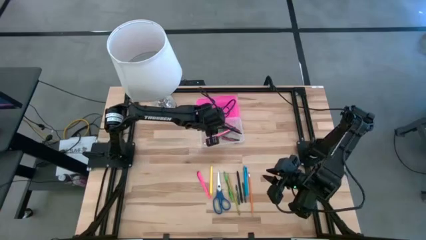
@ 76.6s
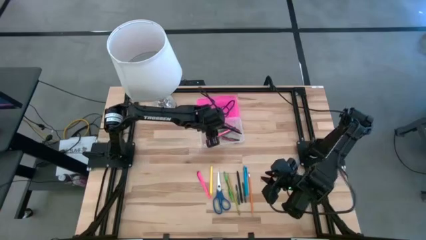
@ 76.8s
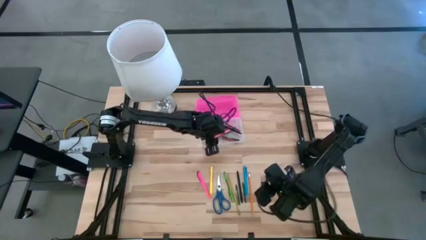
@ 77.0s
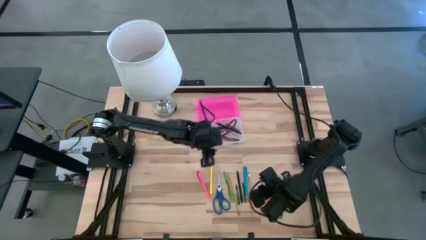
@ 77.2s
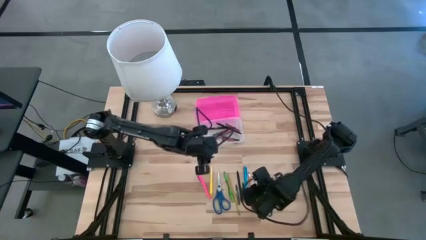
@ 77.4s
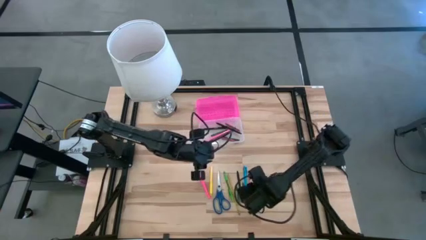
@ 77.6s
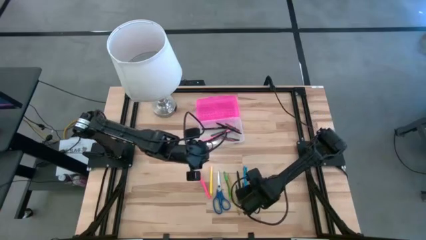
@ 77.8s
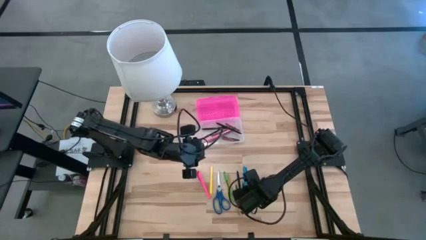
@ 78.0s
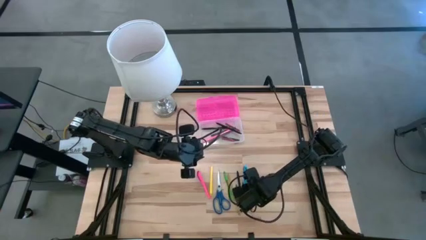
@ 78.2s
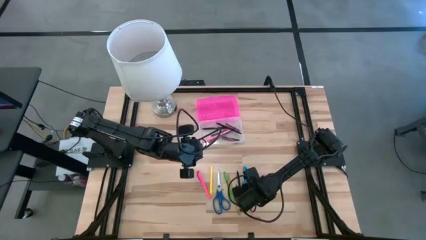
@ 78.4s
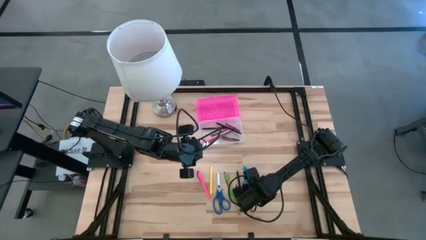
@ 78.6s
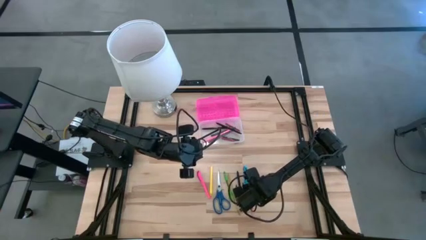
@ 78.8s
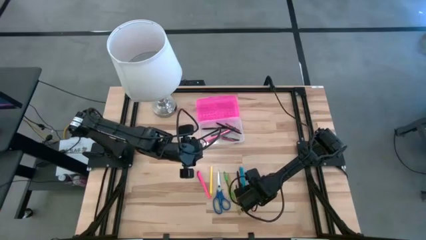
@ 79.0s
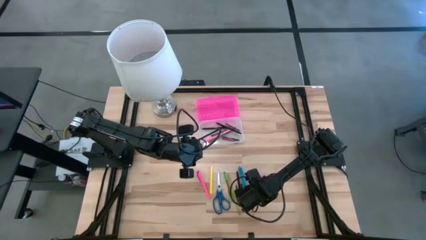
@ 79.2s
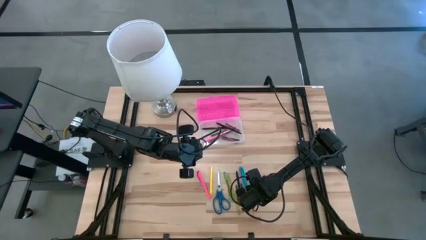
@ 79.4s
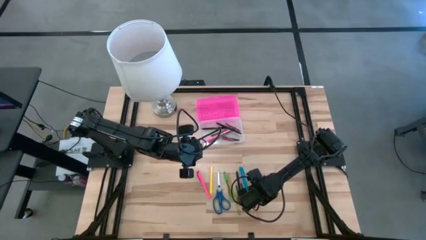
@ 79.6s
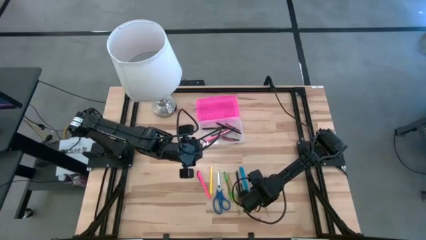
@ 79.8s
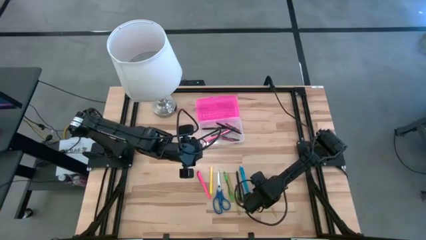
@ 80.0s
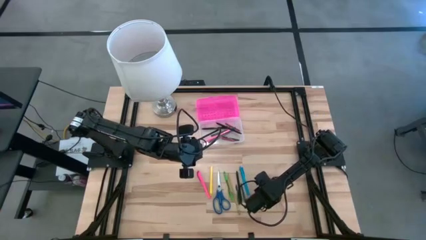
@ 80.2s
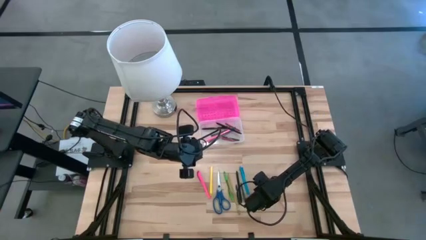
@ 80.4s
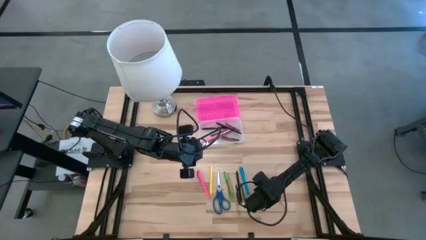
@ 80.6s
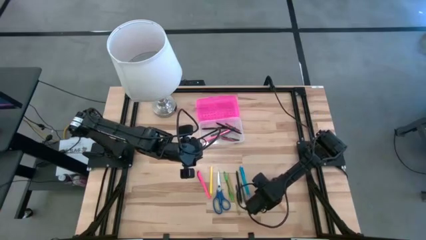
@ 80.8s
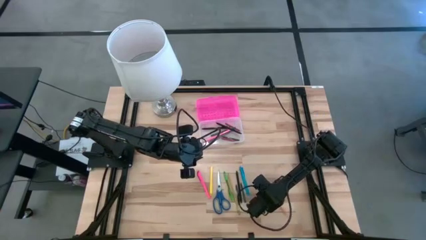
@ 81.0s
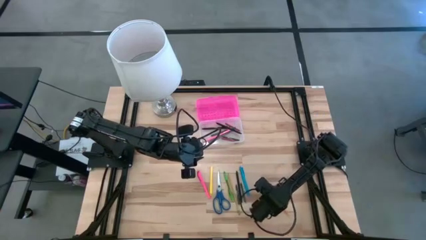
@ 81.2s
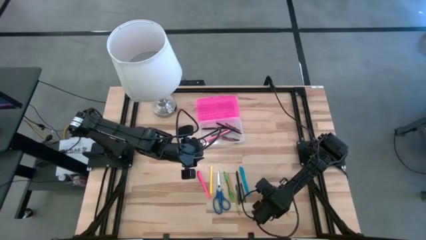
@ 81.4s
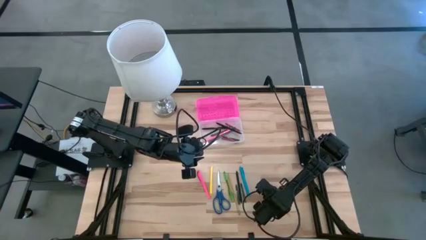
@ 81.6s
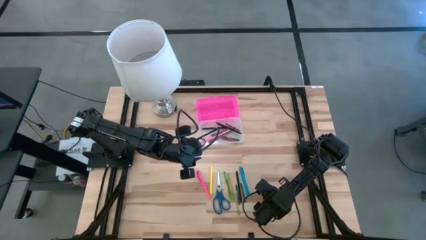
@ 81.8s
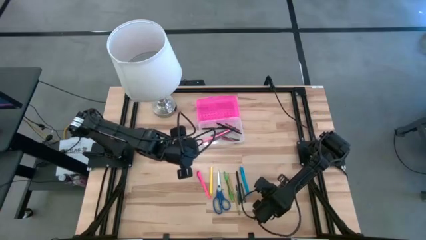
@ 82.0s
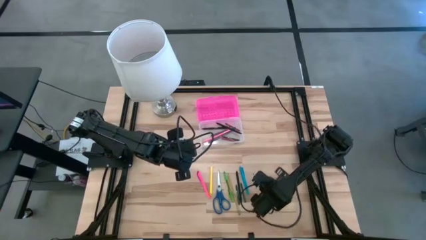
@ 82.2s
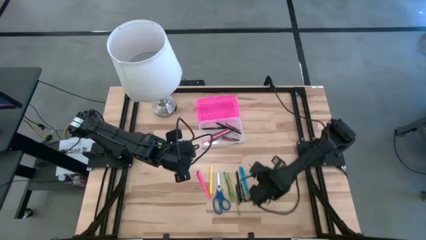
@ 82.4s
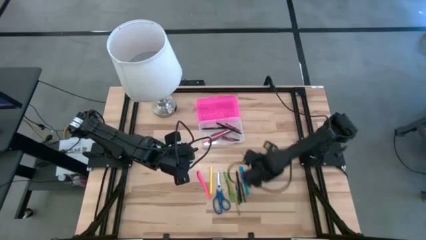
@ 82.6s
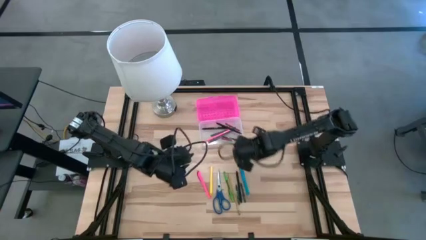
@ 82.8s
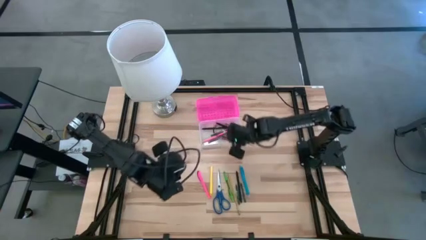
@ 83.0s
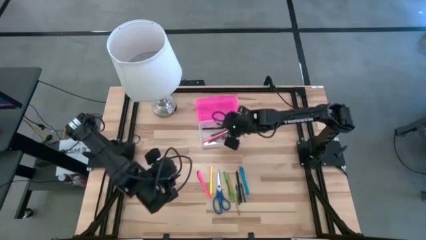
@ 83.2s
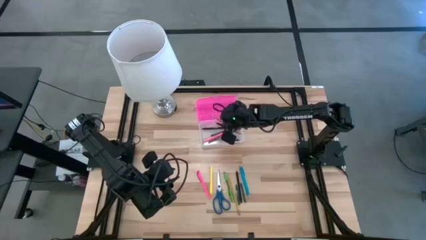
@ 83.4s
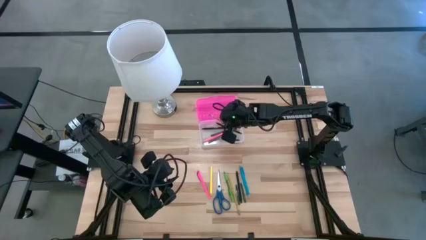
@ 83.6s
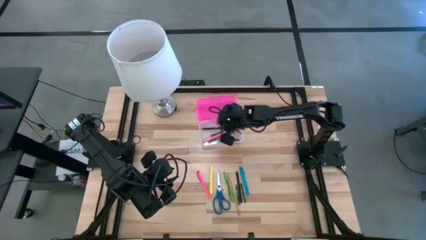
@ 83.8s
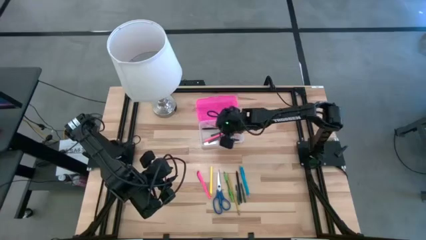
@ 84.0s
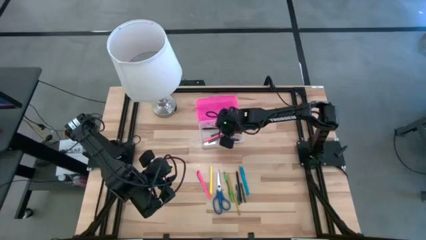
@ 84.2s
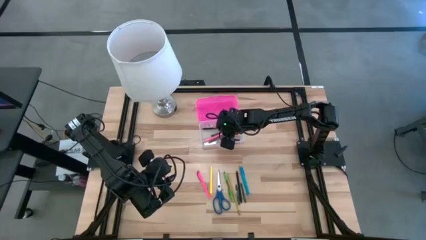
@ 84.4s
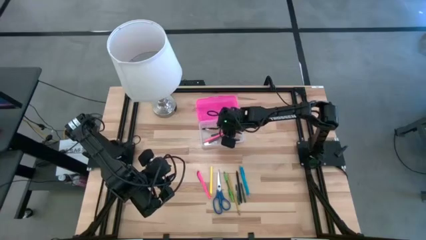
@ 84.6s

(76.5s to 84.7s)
Task: Pick & place school supplies into a supply box
Put the orange pencil into the pink supply box

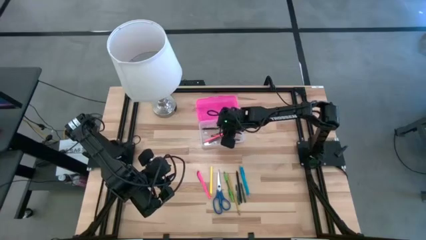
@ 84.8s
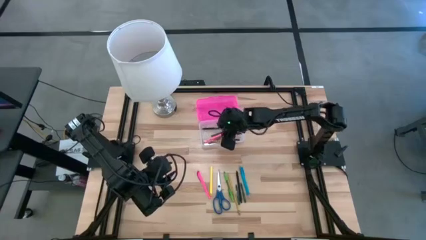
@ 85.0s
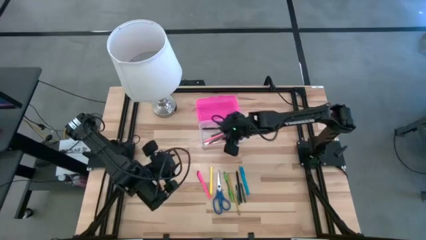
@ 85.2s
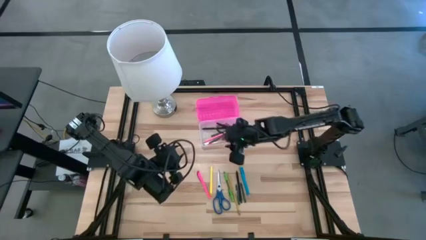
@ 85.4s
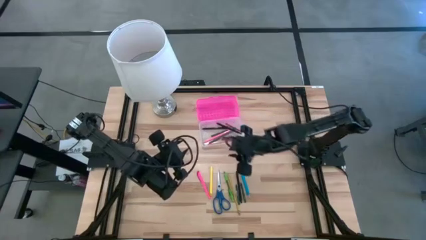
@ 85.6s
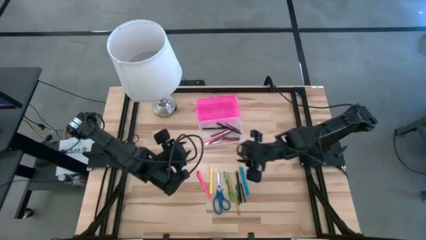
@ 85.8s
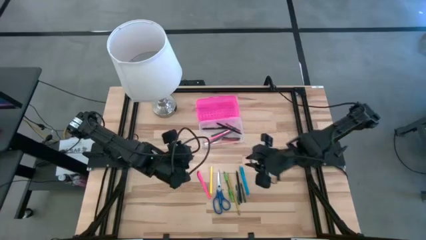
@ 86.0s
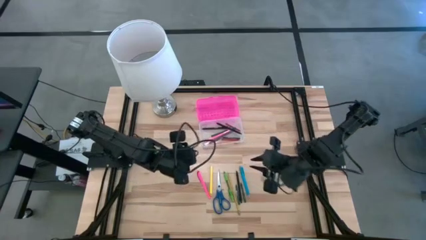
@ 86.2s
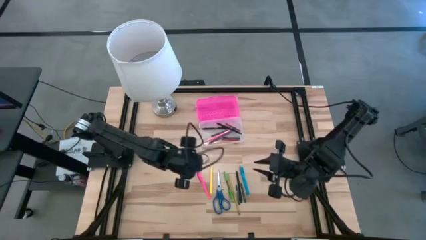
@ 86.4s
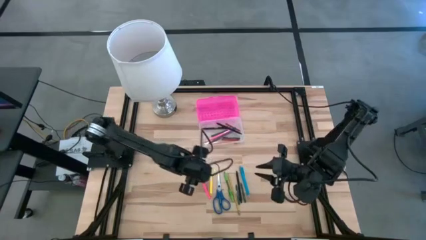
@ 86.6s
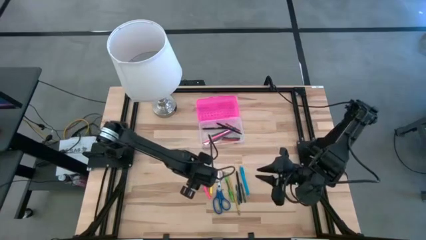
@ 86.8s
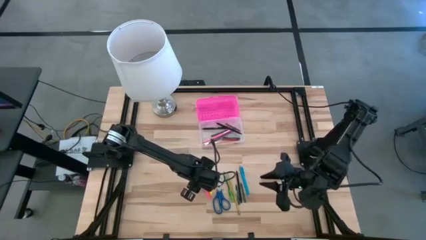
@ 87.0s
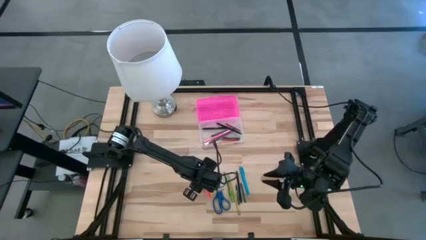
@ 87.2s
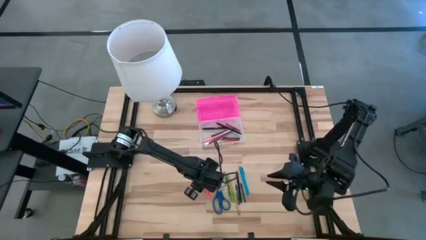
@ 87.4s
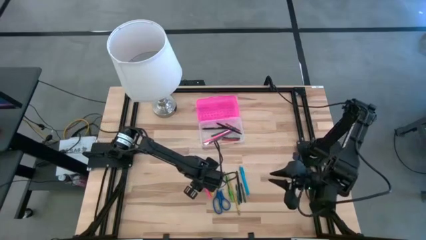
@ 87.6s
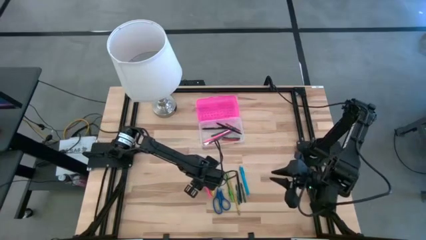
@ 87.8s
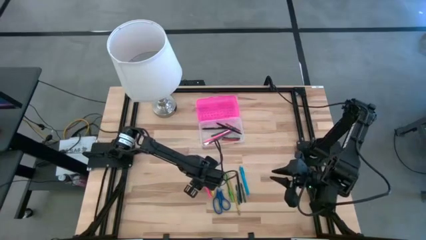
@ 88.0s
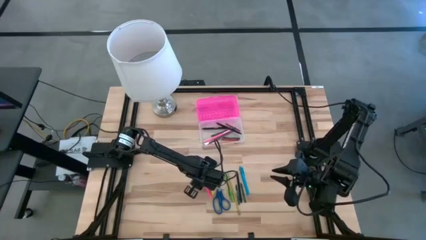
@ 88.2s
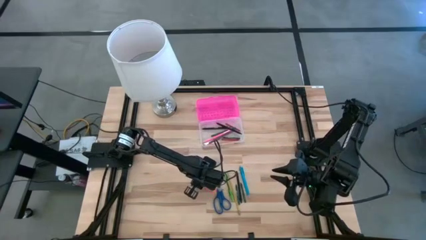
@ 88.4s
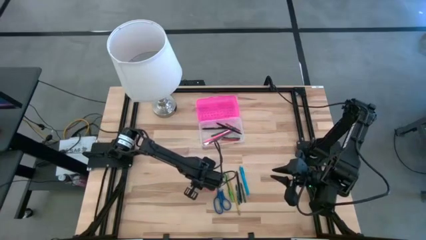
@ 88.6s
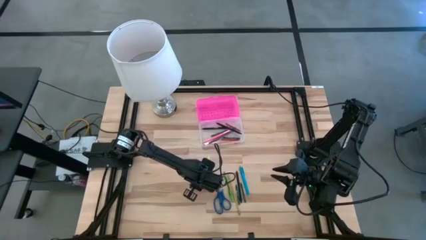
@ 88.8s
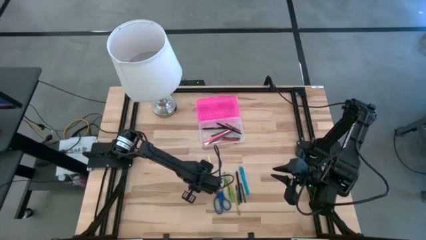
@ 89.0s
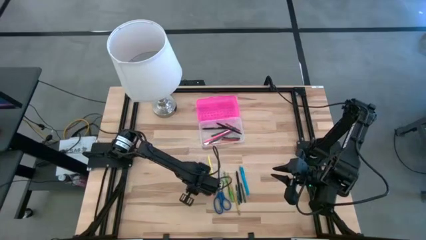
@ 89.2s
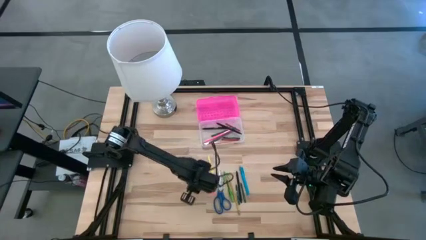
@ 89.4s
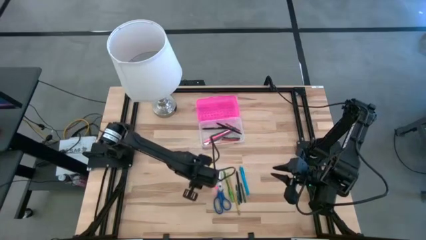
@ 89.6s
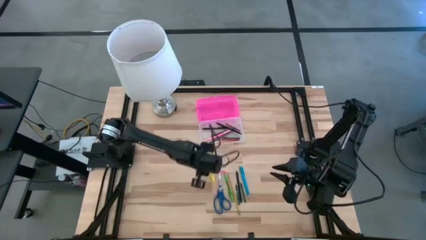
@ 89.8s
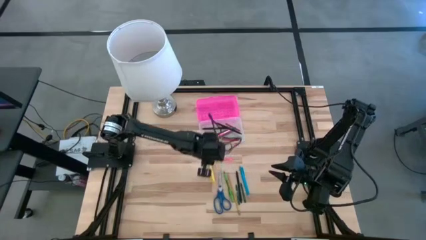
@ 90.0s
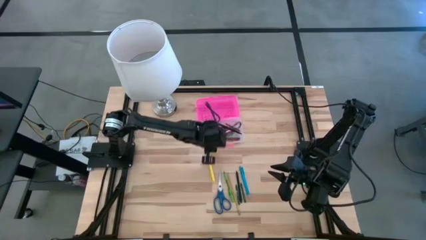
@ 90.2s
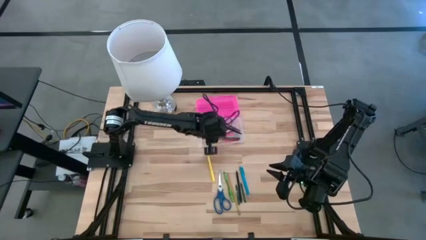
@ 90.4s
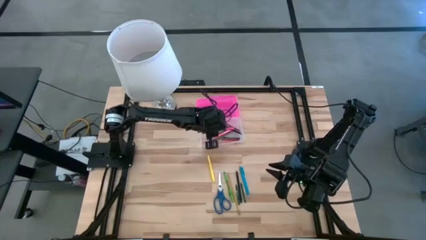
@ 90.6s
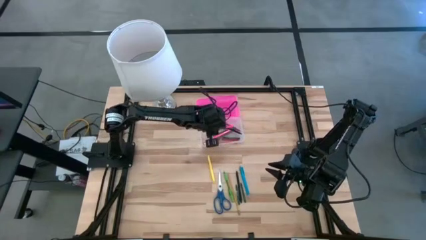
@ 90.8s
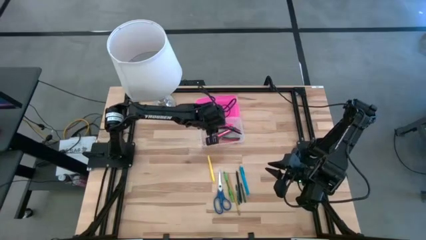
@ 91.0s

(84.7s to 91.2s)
Put the pink pen into the pink supply box
